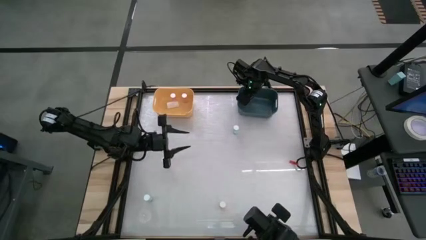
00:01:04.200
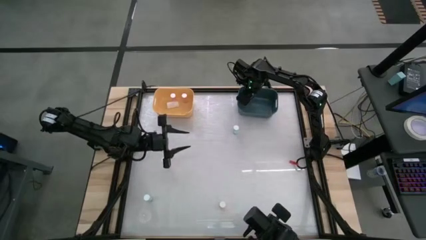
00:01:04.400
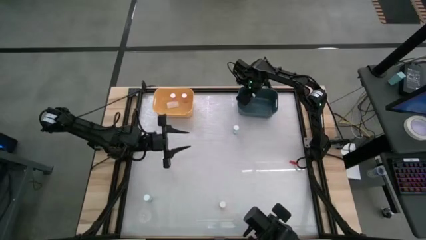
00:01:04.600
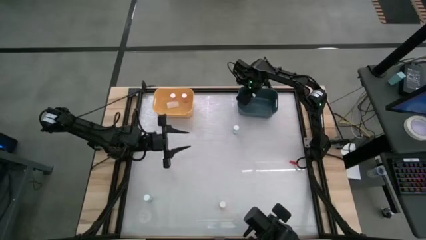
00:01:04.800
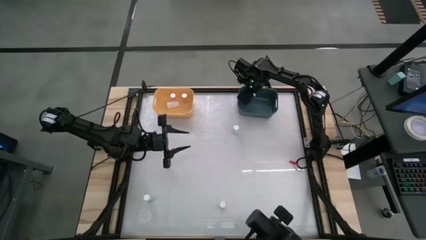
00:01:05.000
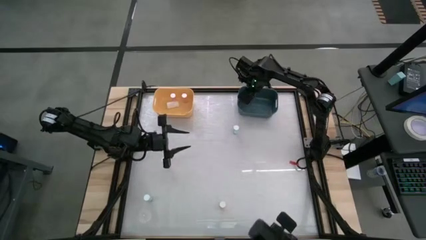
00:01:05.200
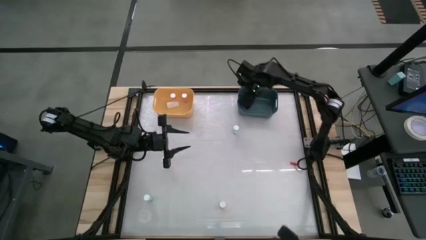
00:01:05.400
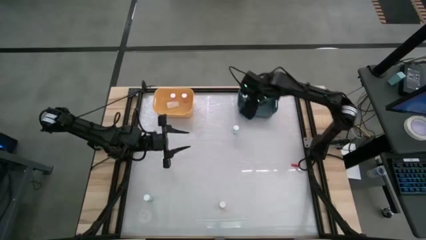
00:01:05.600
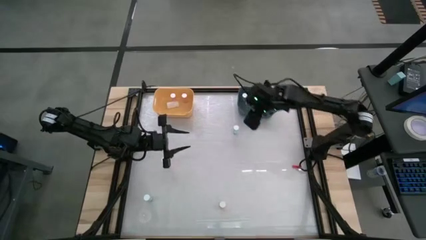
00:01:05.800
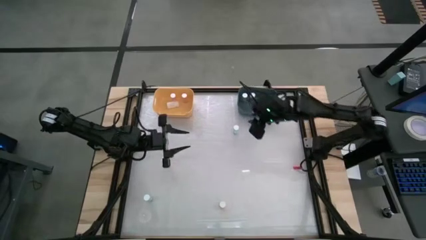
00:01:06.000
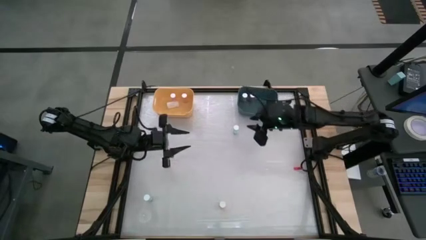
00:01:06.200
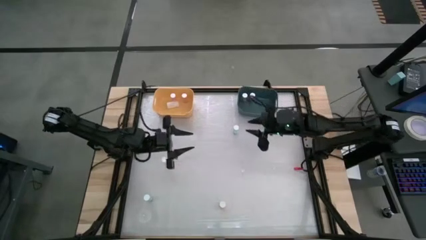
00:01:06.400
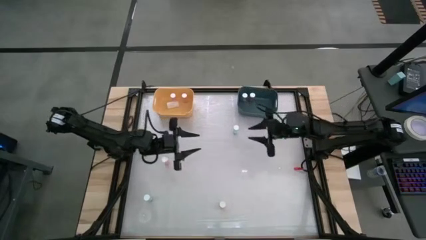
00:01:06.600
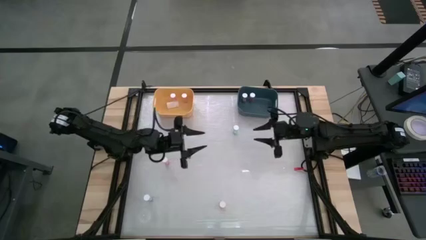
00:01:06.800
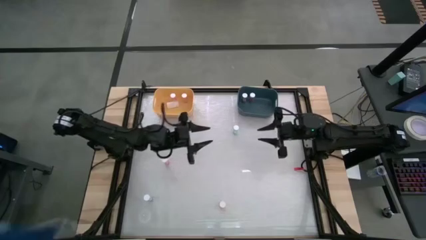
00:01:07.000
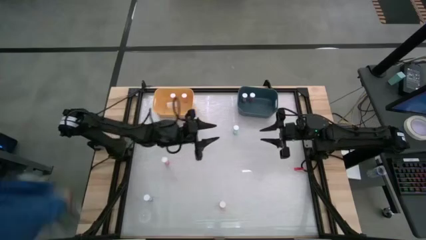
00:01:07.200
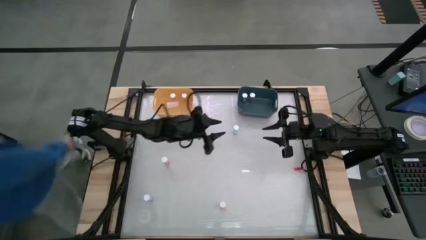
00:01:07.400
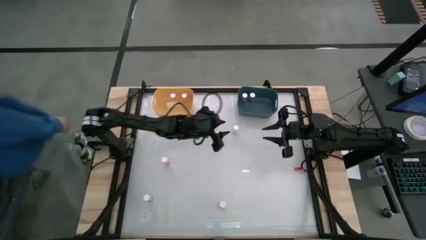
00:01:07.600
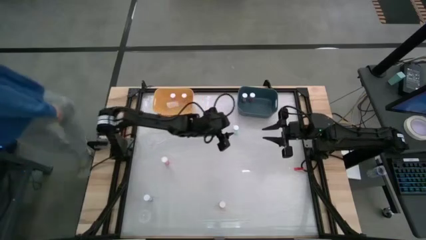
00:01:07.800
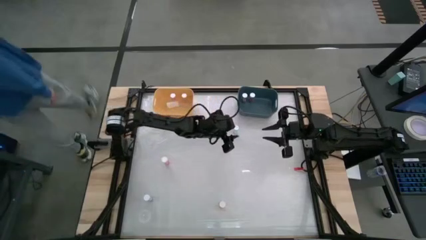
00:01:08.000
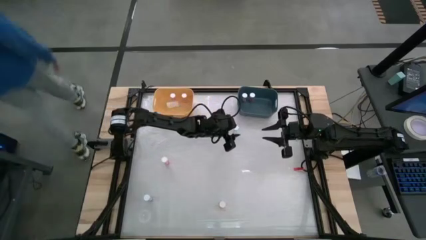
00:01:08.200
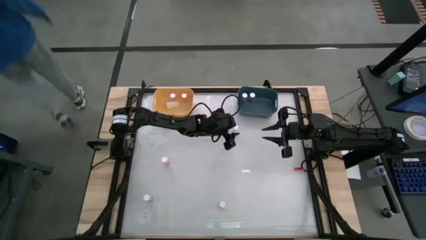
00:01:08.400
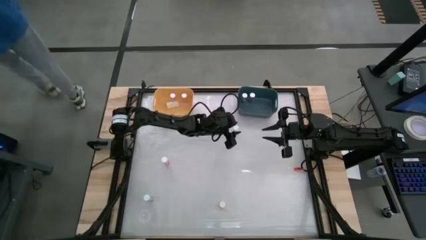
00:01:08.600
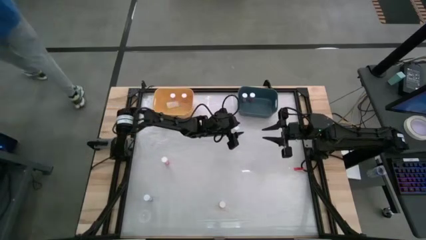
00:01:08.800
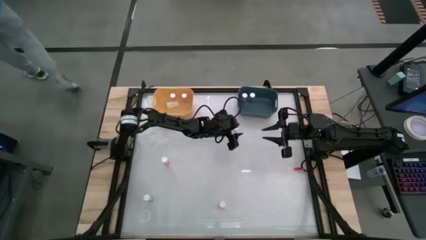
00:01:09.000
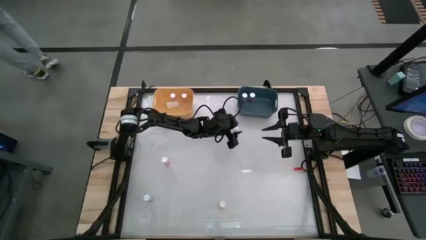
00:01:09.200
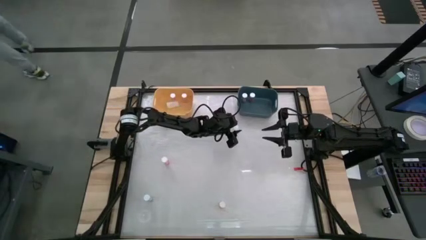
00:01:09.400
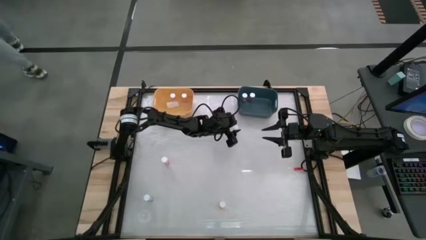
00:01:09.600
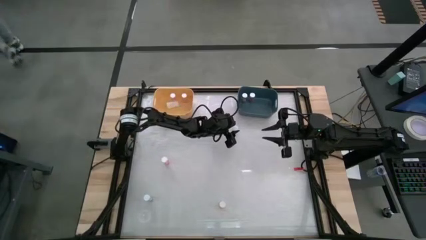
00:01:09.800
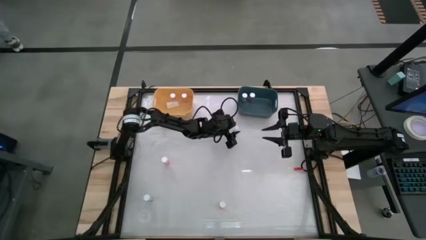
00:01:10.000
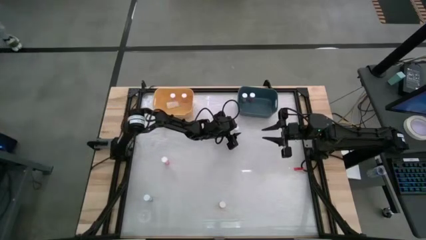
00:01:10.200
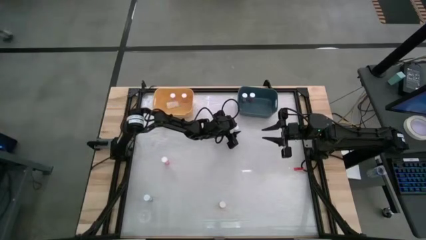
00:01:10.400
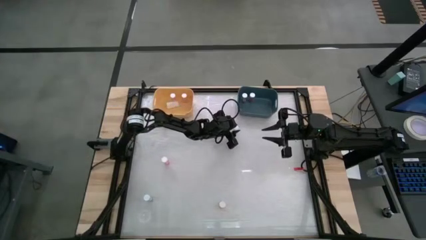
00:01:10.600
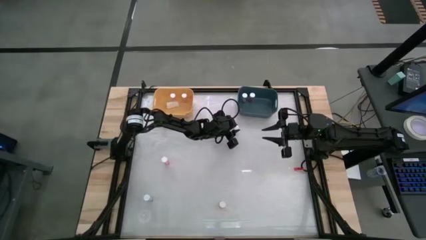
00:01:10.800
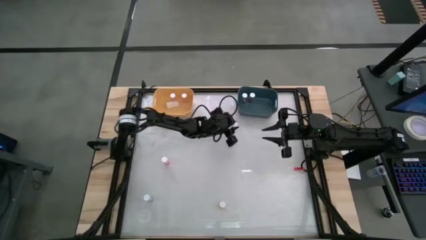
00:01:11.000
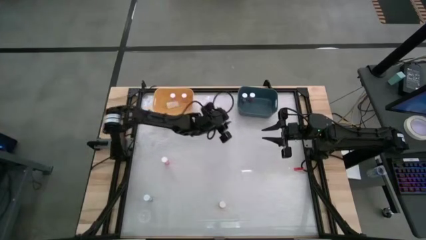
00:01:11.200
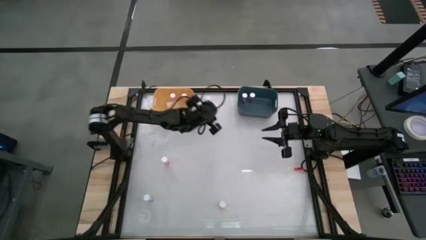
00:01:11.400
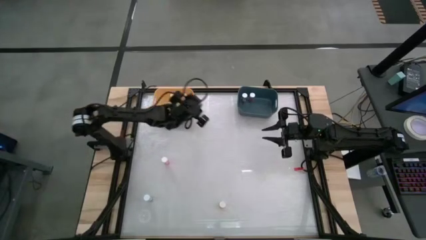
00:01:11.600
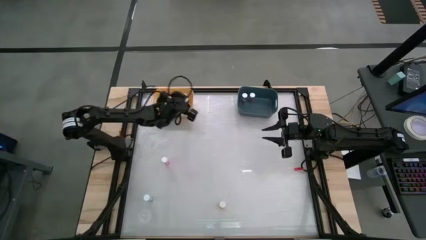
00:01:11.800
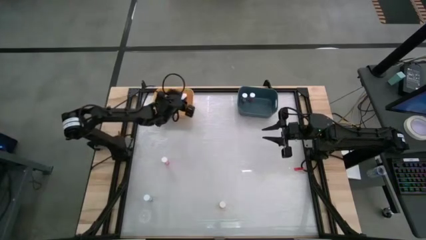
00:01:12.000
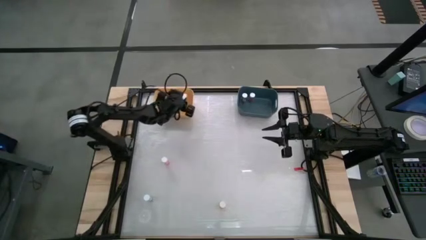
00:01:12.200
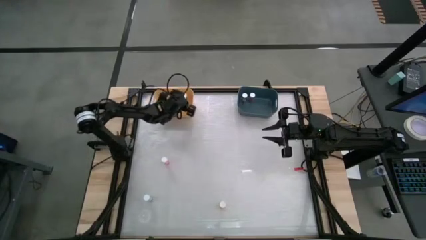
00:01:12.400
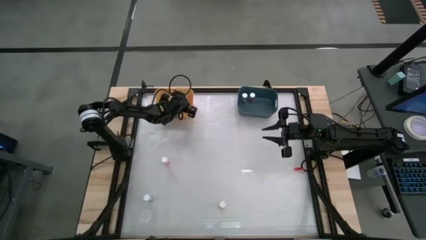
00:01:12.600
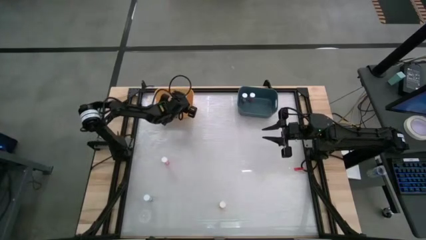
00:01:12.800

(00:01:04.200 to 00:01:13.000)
Task: Pick and place medicine bottles into bin by pill shape (circle, oval)
Put the blue tablet bottle into the yellow bin

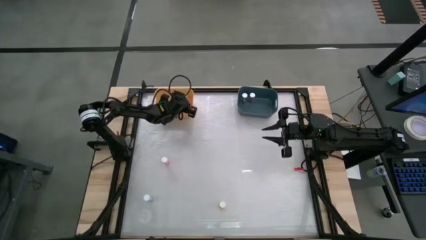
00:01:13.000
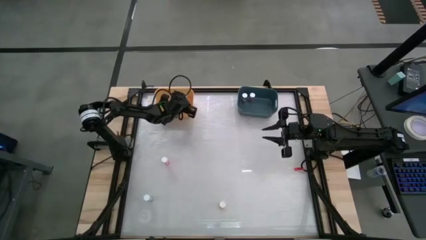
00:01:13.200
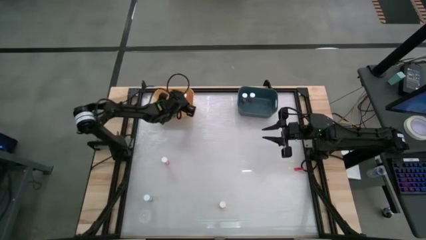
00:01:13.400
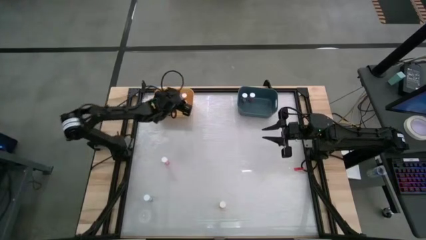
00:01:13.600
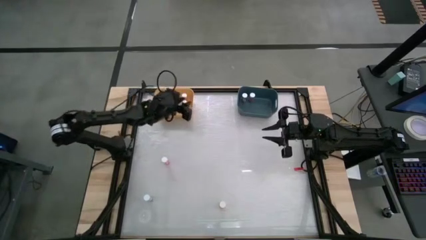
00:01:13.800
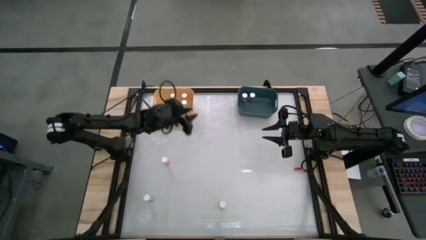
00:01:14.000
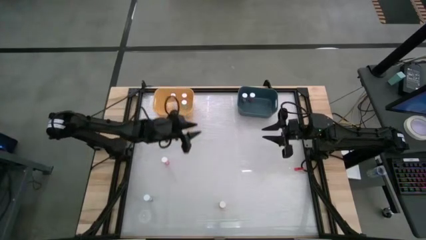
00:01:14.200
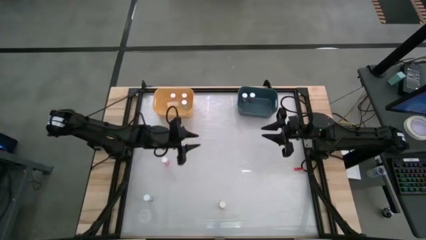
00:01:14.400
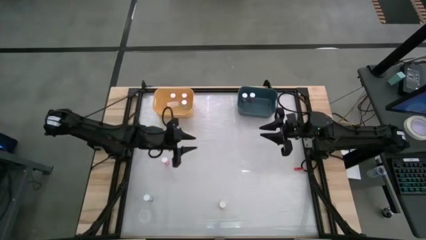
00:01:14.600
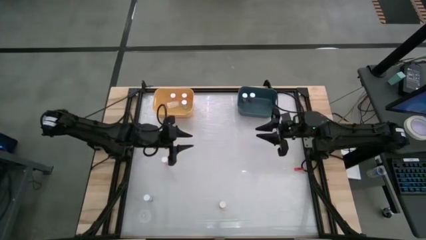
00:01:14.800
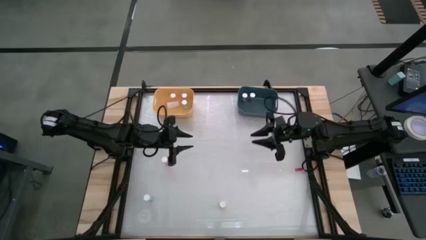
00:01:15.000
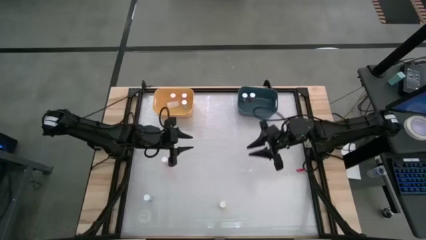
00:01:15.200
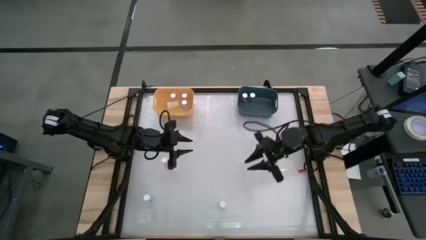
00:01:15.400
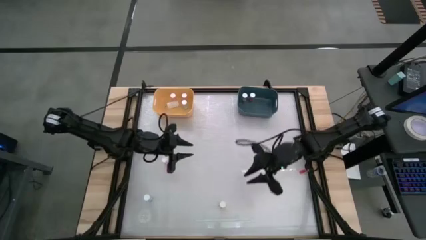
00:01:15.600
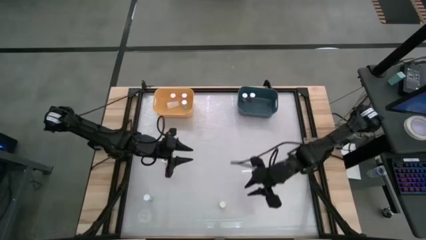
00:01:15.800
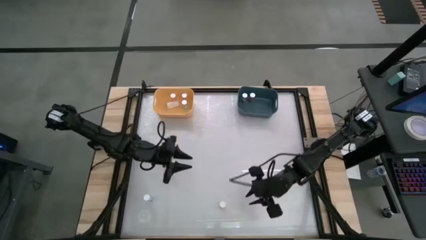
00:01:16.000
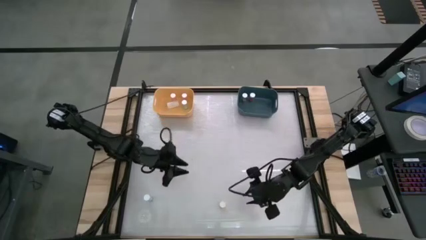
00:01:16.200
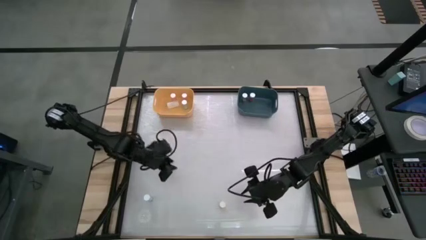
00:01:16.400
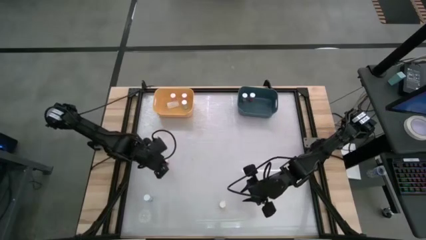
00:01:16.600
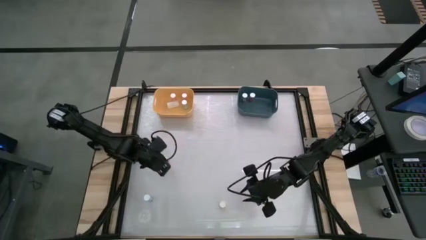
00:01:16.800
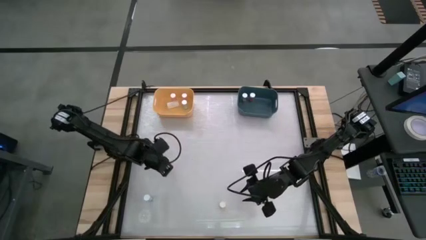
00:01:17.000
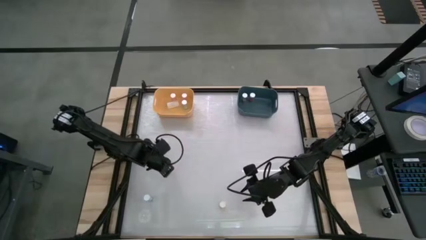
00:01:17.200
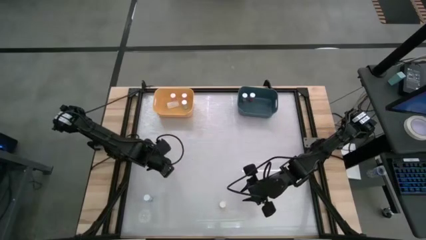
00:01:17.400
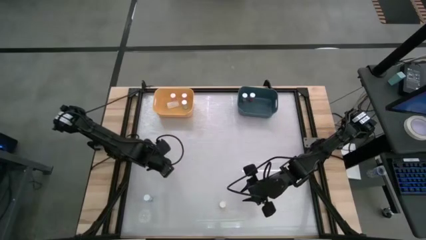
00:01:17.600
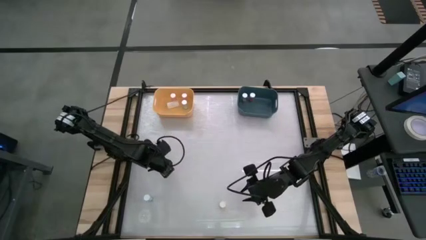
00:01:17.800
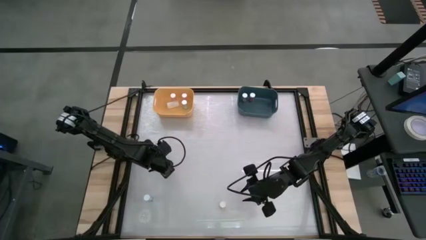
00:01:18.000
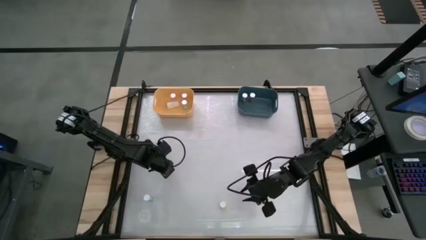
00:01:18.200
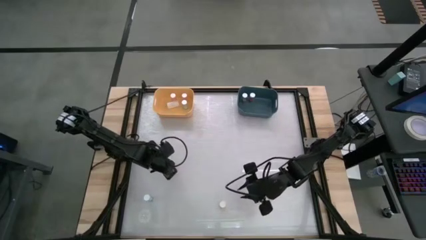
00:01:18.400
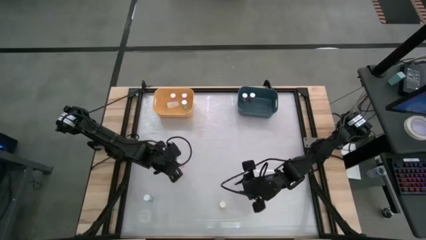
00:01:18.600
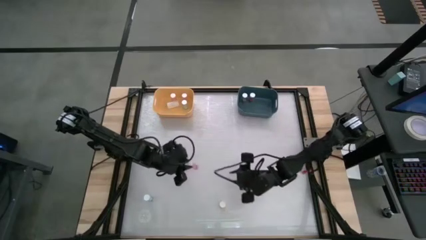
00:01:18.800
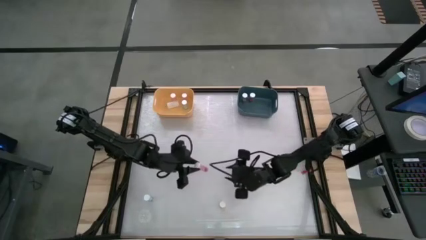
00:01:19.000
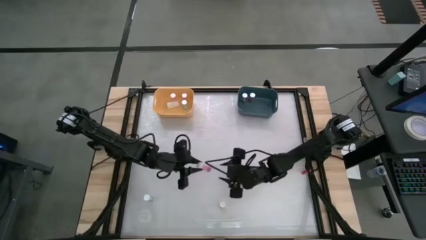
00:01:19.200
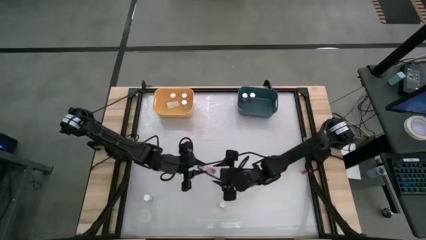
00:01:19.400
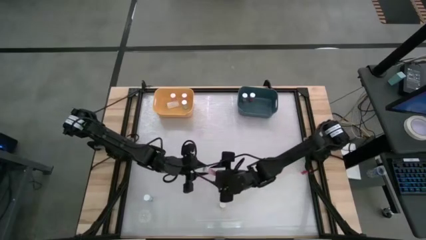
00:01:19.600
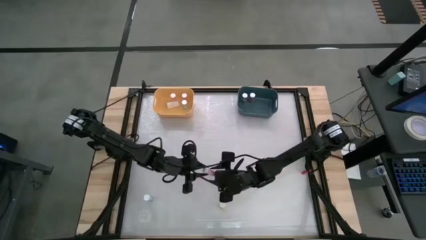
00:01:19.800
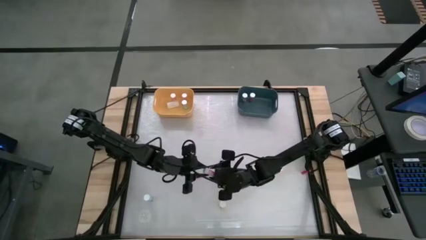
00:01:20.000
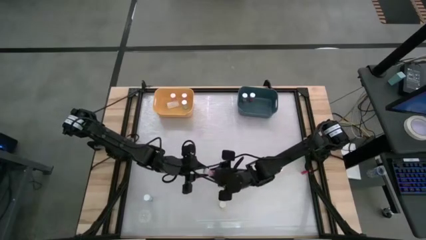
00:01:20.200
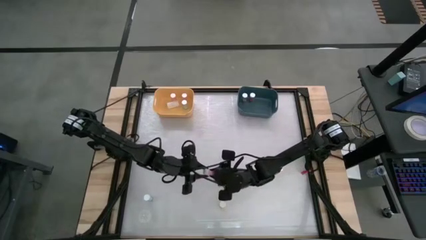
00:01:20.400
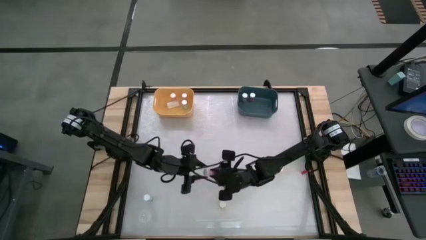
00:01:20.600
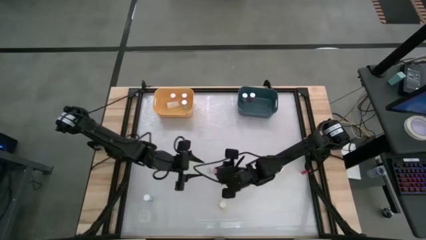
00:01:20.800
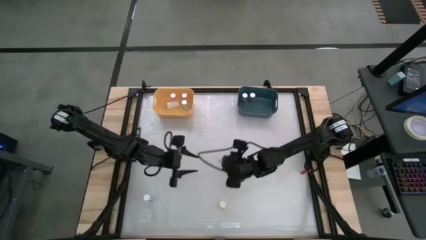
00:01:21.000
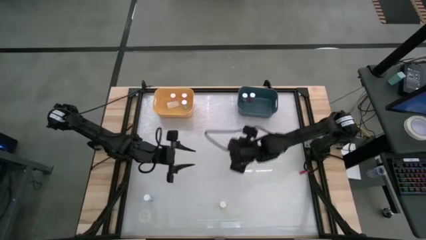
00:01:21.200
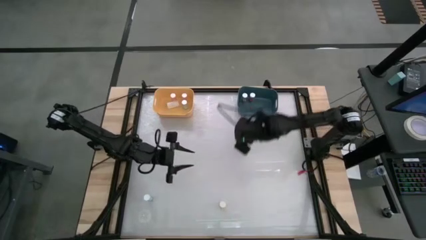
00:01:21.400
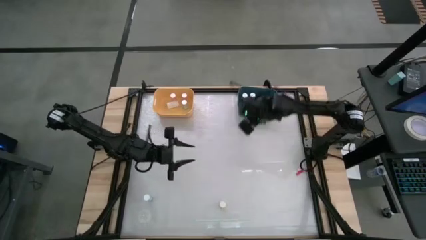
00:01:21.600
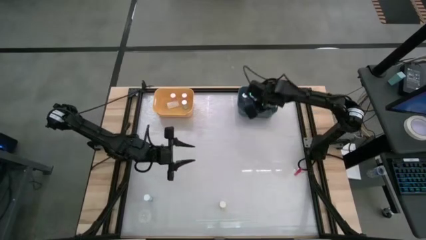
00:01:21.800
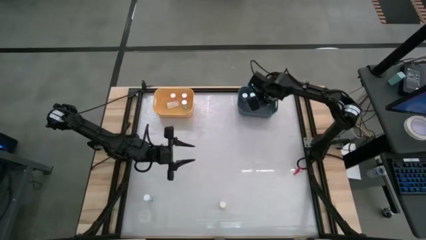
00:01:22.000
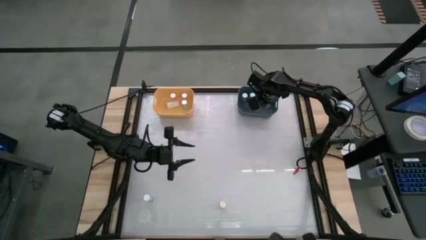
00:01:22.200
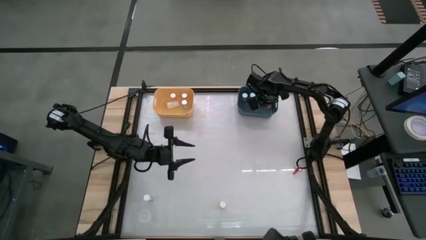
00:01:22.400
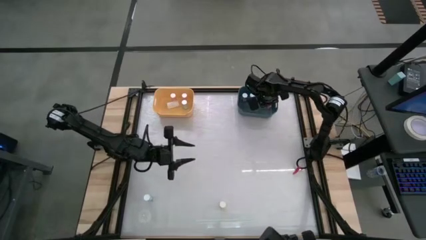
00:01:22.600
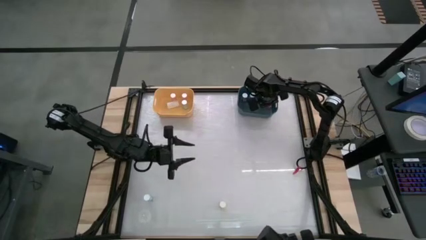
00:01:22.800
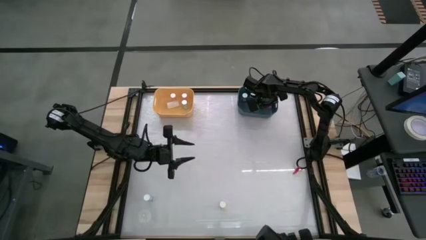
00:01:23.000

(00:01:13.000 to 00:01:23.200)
Put the pink capsule bottle into the blue bin
